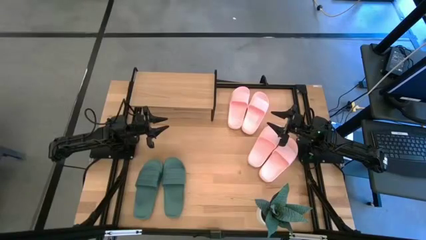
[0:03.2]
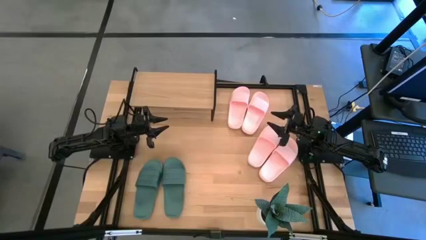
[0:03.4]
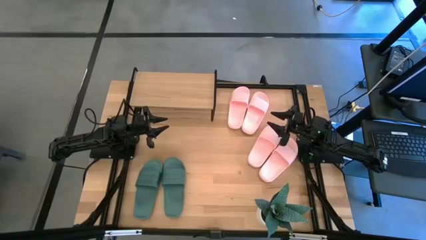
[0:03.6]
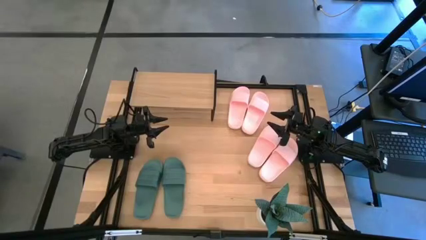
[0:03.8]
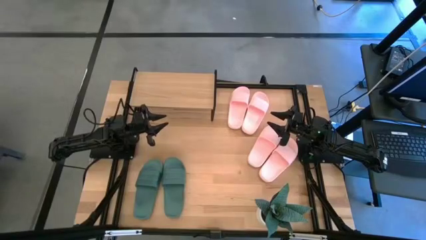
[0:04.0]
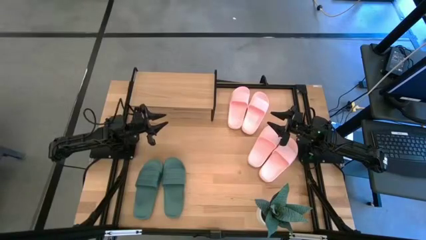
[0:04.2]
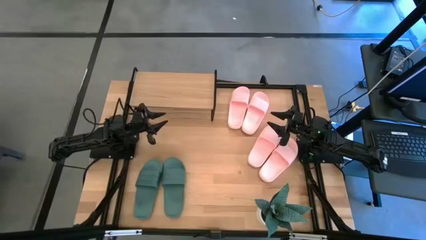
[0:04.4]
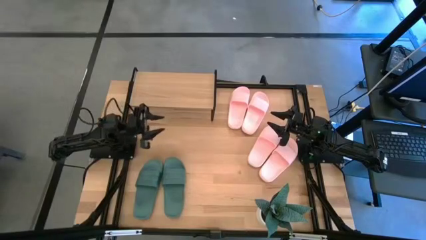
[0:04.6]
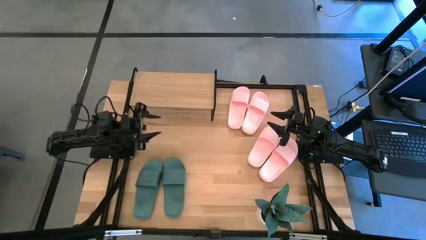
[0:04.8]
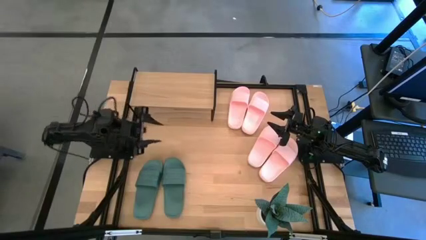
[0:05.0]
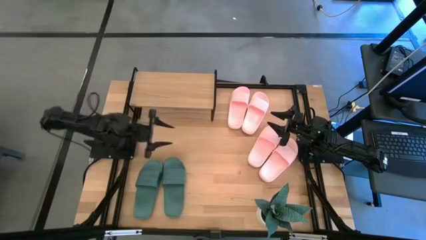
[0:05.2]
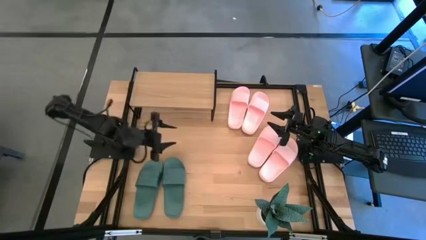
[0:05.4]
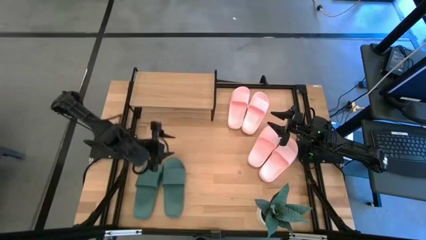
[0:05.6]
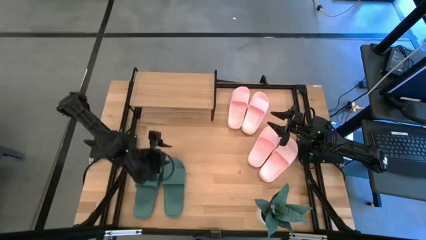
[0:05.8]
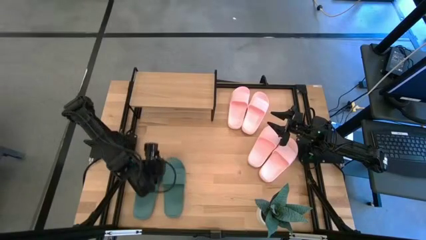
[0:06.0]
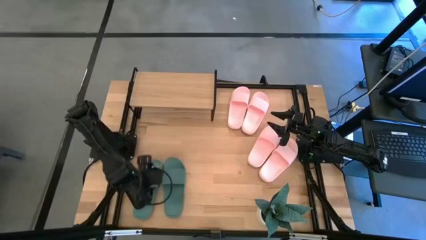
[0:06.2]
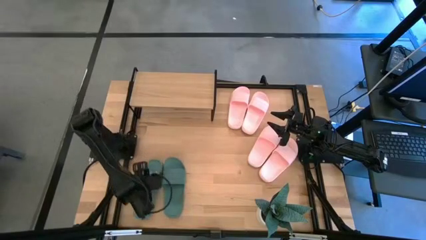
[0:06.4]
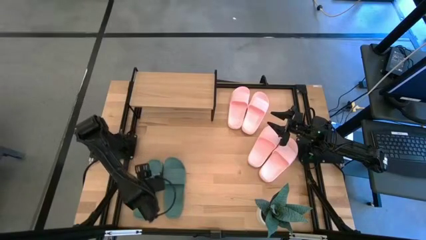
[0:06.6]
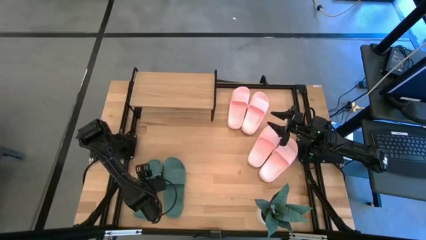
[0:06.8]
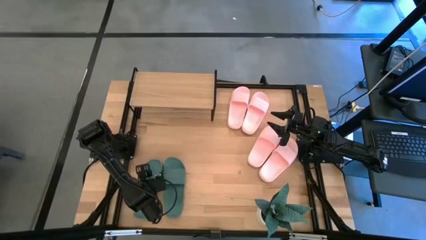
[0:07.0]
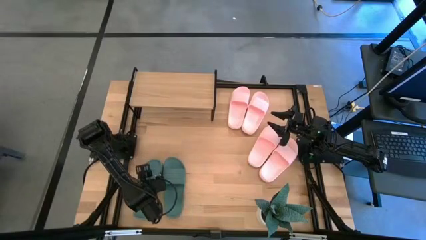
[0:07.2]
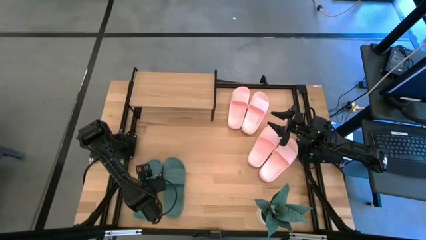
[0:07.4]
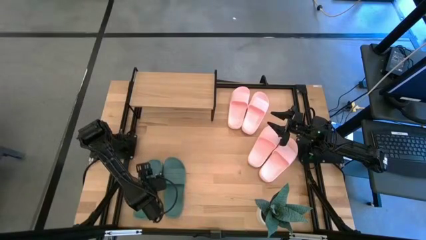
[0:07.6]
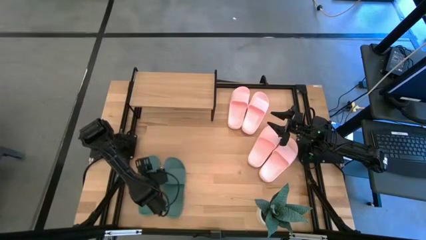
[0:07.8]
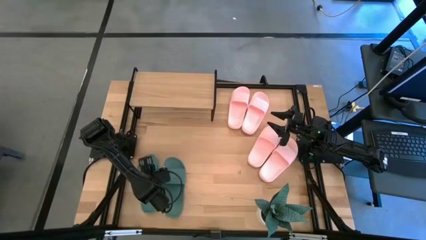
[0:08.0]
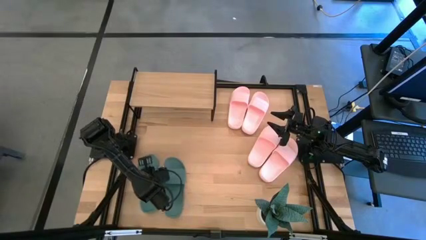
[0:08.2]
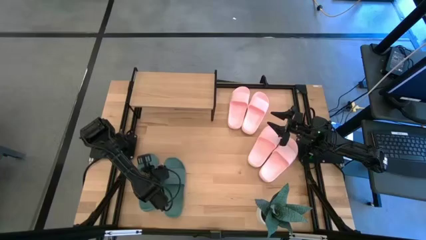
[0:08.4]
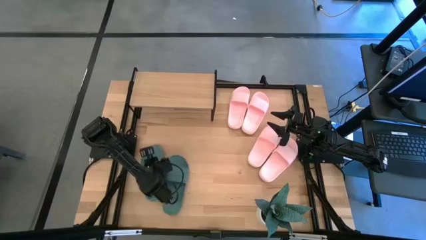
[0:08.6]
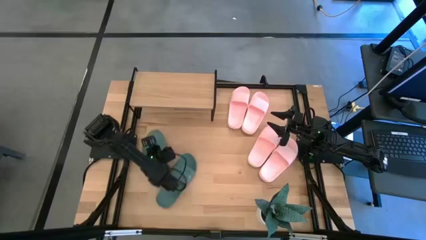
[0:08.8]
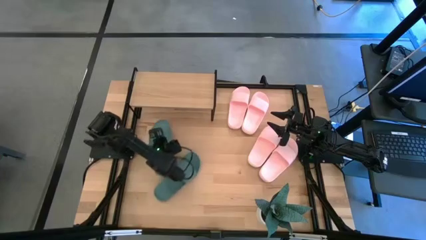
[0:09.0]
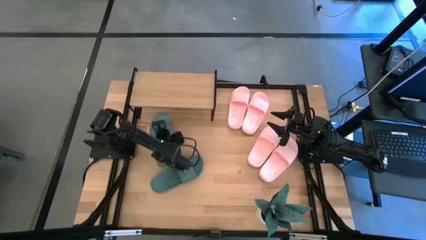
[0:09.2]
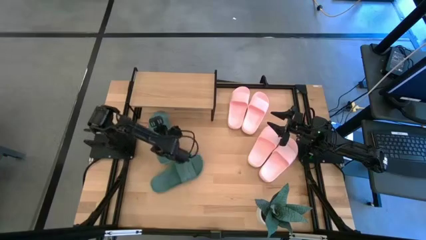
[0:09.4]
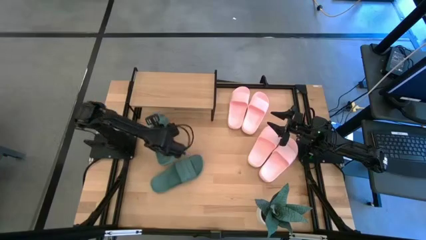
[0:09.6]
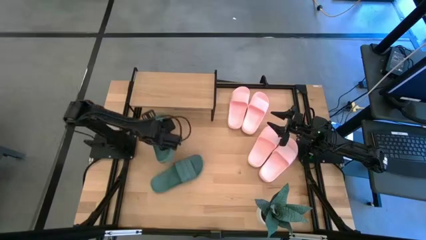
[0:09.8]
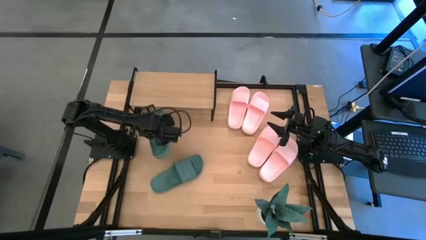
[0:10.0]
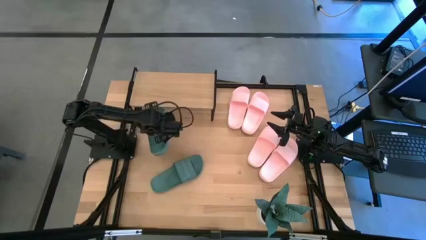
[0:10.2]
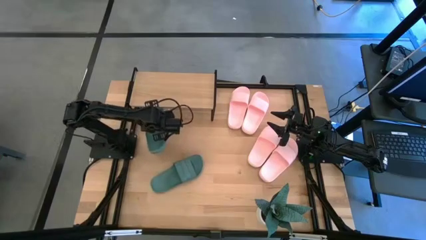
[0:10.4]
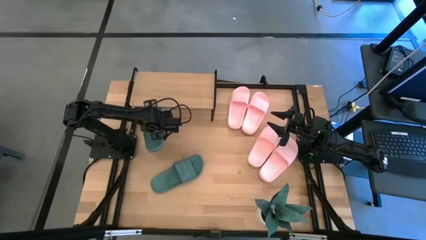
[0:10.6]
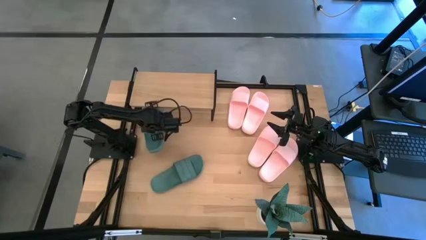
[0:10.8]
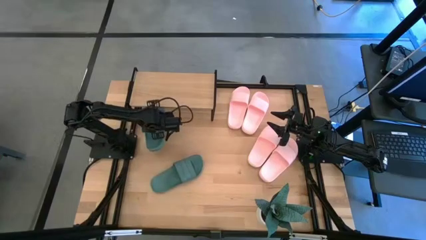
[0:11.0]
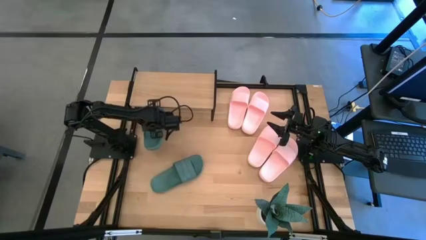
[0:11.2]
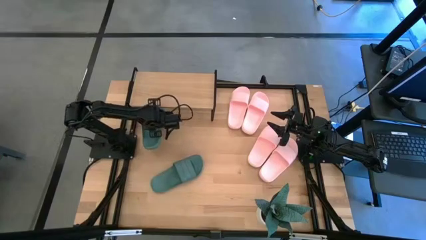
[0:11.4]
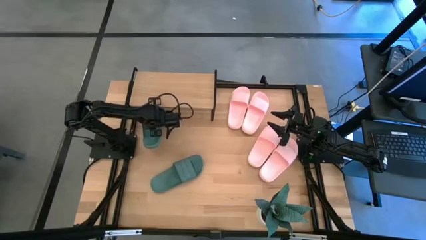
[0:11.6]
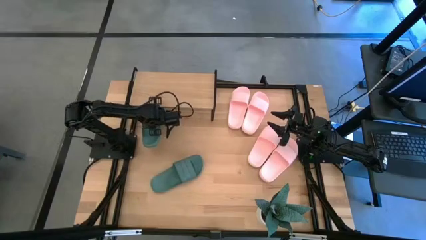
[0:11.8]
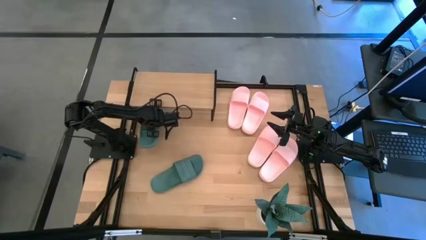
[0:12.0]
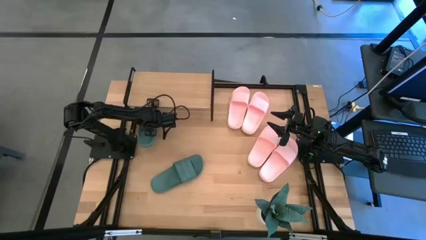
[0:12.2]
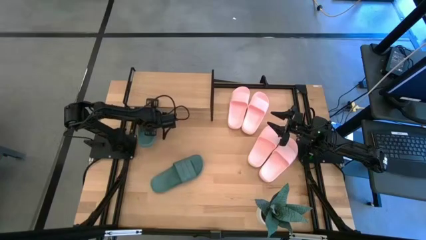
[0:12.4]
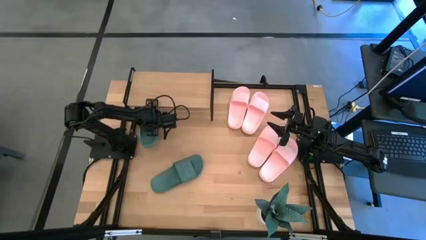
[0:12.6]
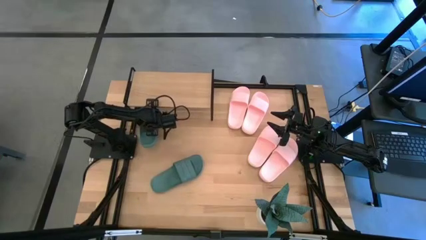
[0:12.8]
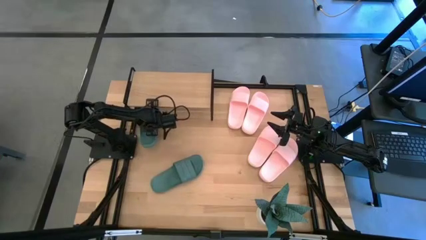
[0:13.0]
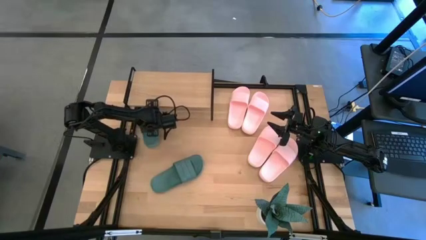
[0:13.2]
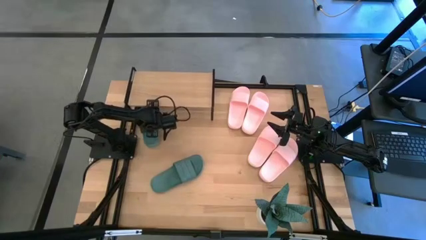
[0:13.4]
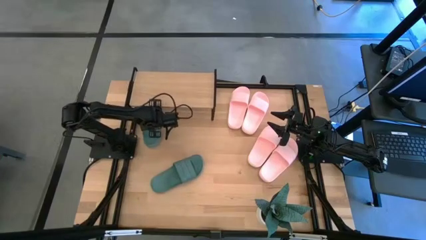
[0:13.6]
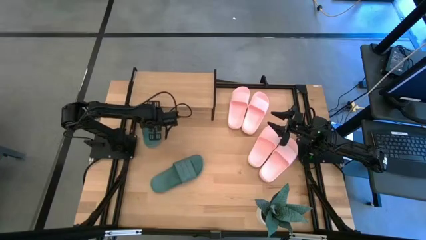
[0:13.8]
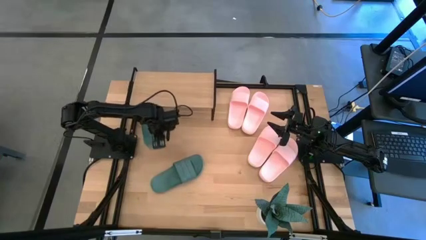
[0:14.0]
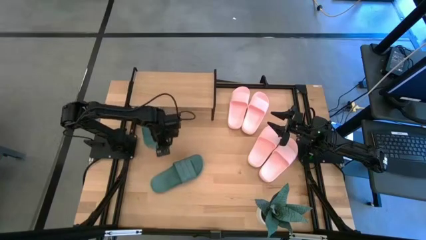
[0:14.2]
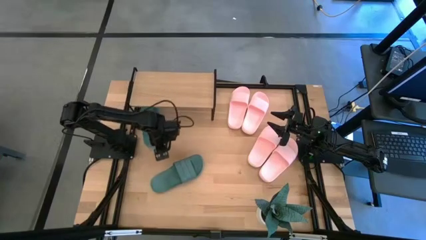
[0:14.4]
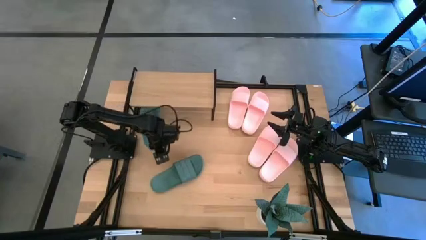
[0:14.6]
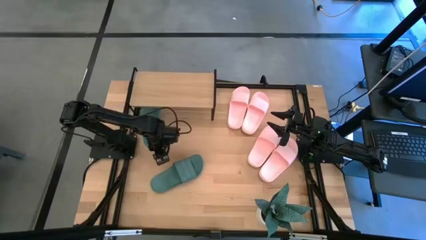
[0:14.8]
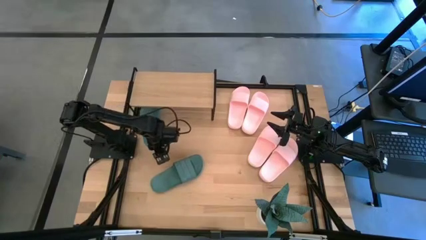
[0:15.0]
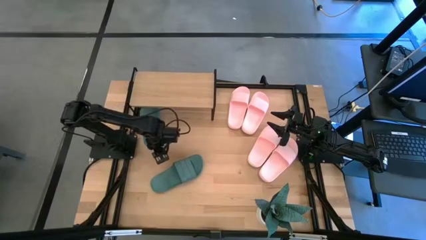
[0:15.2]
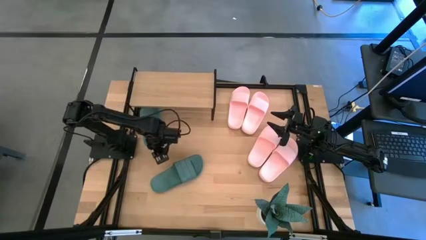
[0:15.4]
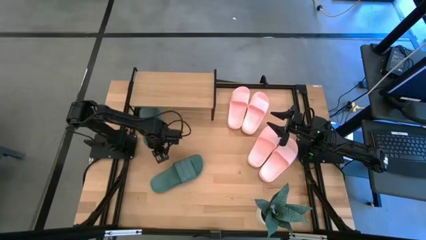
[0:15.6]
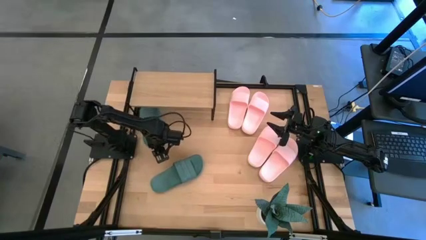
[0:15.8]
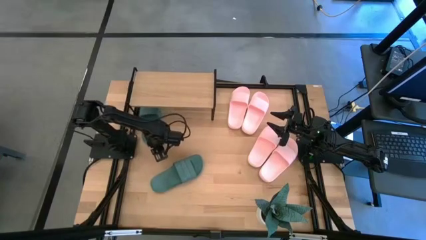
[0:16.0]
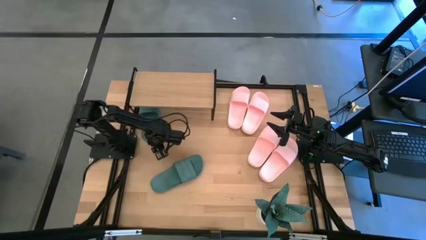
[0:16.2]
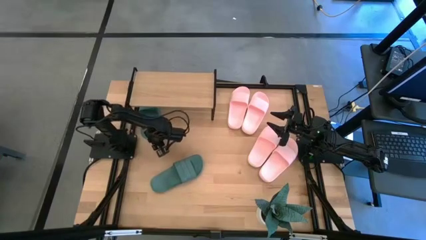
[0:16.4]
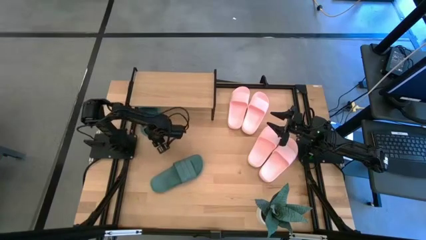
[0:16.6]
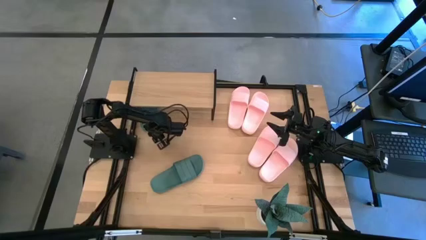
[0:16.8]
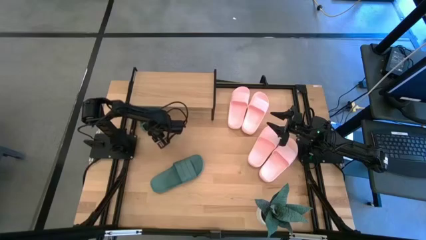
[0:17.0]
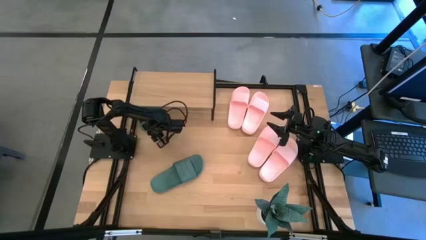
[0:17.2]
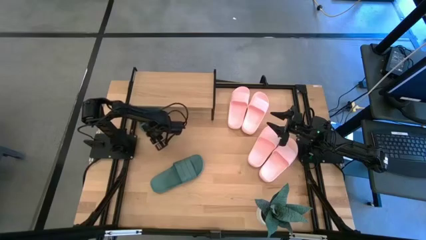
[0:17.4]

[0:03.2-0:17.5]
Task: Pick and place slides into the shelf
Put the green slide under the shelf
